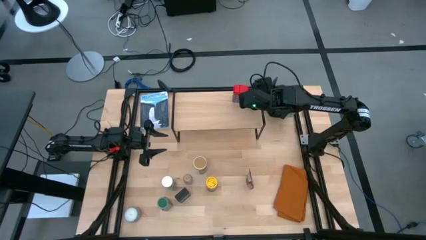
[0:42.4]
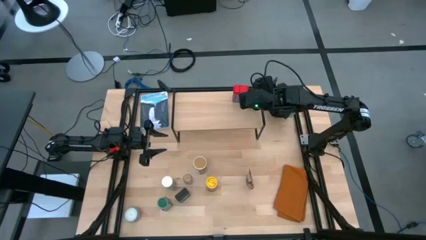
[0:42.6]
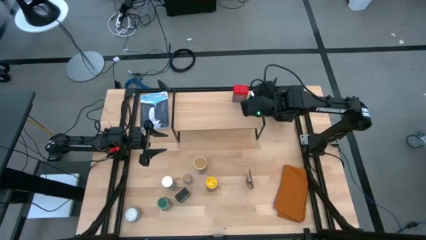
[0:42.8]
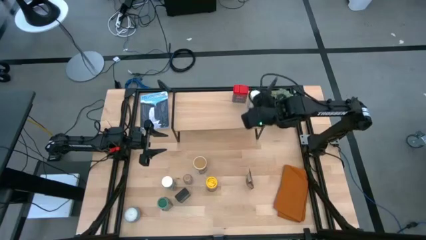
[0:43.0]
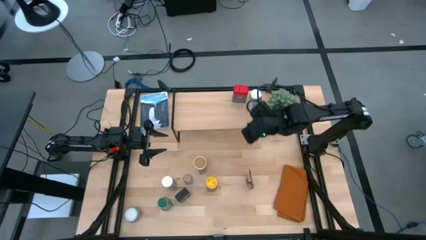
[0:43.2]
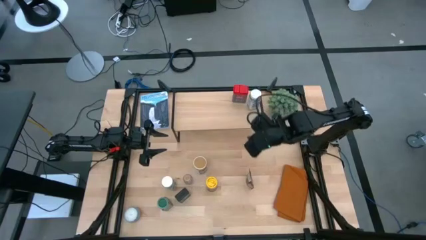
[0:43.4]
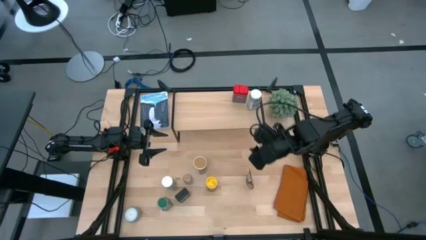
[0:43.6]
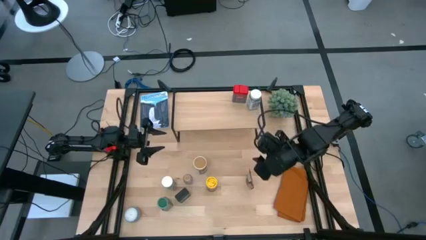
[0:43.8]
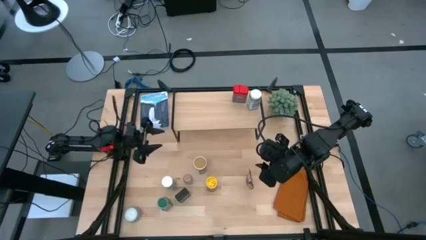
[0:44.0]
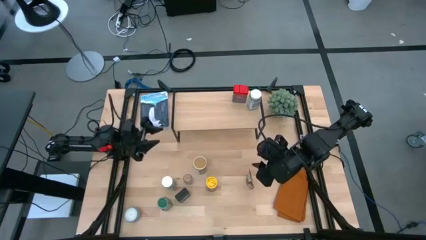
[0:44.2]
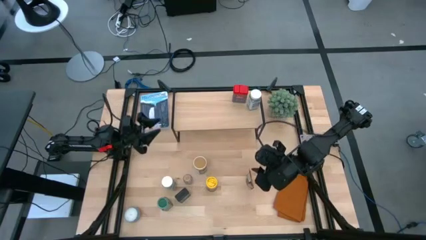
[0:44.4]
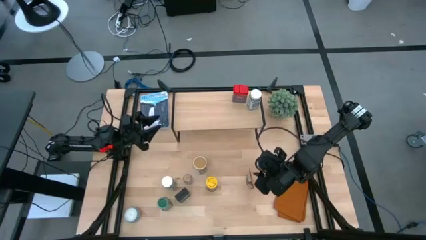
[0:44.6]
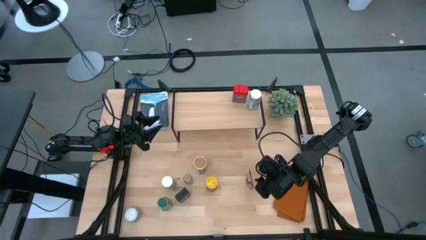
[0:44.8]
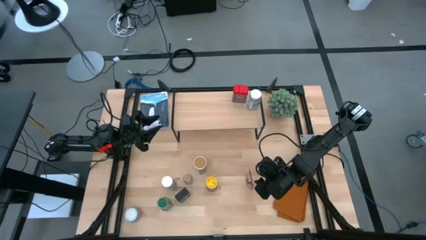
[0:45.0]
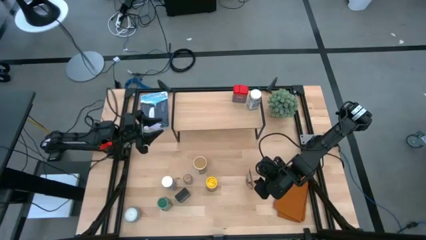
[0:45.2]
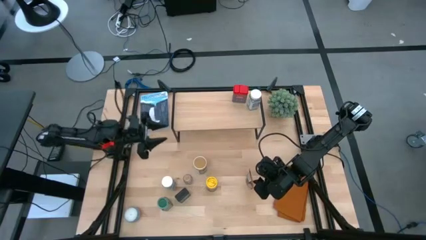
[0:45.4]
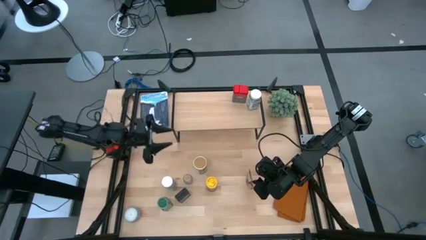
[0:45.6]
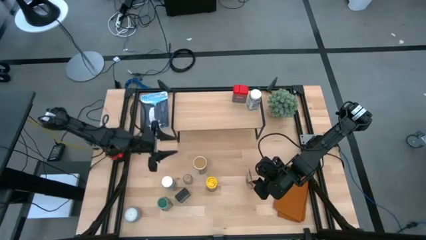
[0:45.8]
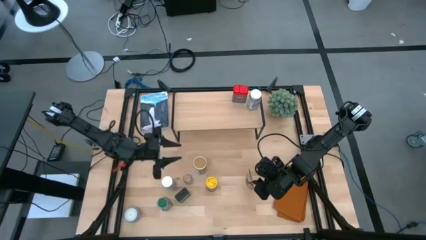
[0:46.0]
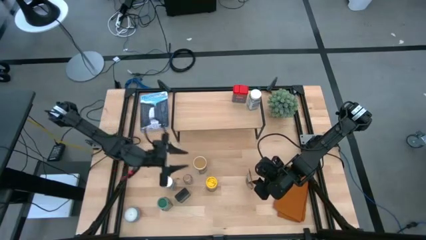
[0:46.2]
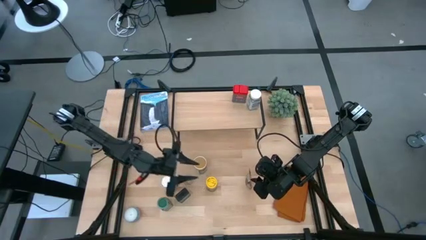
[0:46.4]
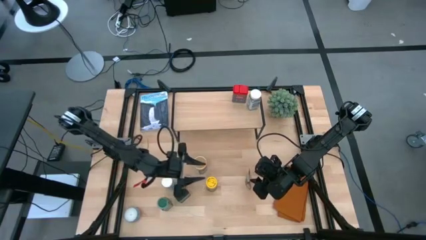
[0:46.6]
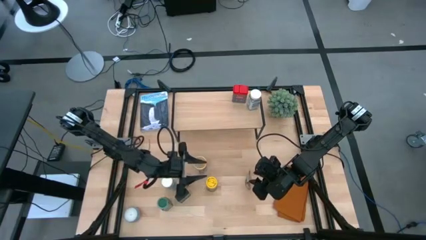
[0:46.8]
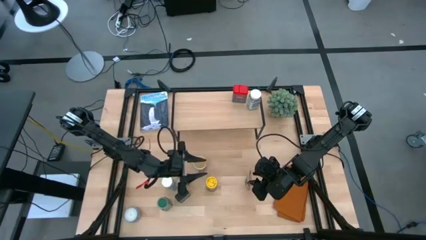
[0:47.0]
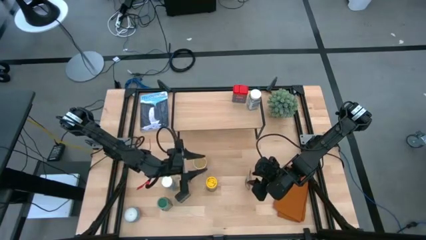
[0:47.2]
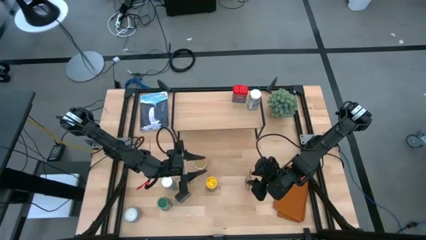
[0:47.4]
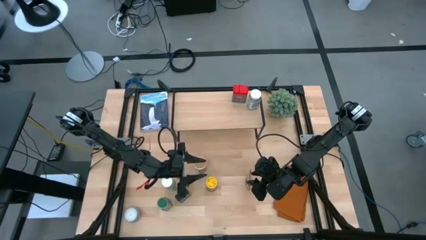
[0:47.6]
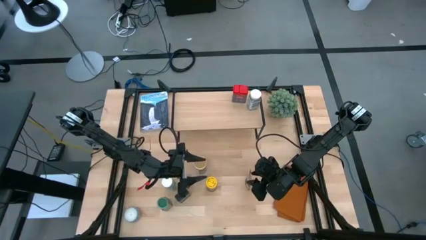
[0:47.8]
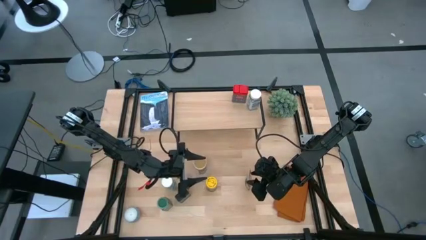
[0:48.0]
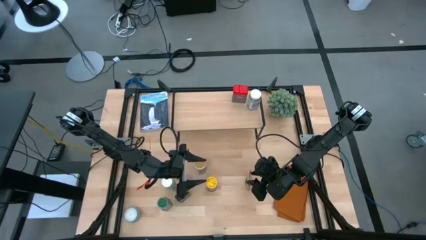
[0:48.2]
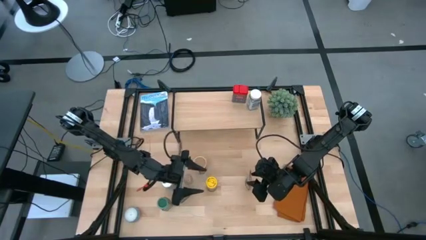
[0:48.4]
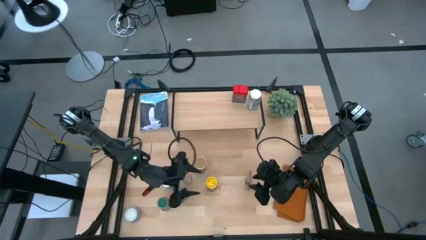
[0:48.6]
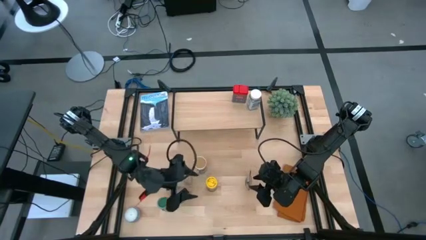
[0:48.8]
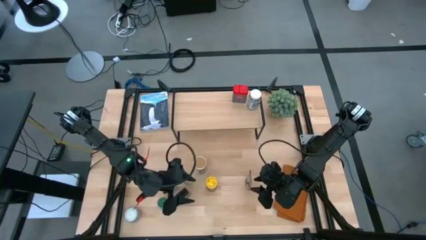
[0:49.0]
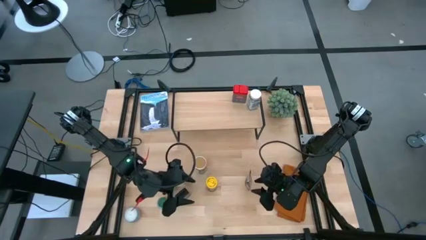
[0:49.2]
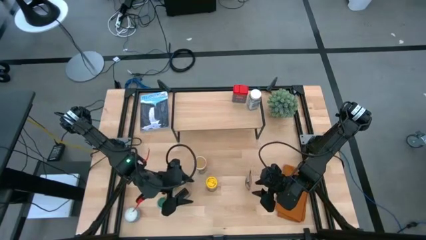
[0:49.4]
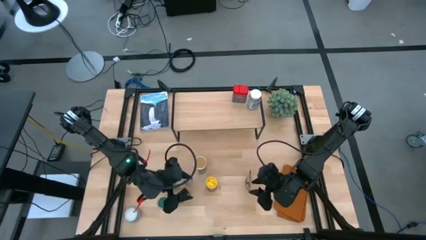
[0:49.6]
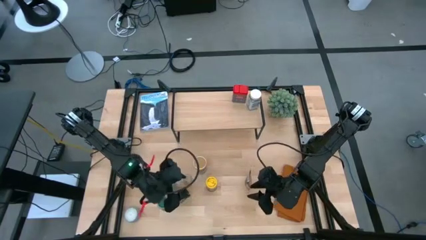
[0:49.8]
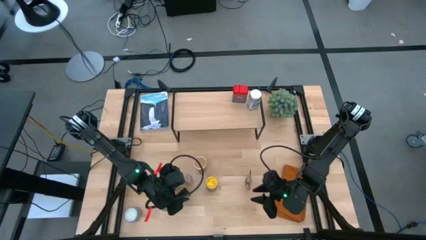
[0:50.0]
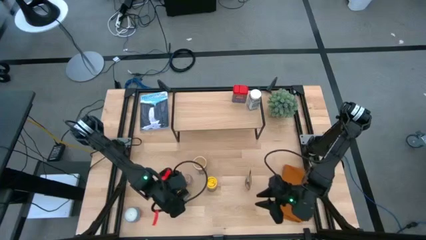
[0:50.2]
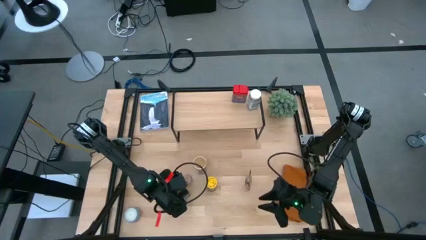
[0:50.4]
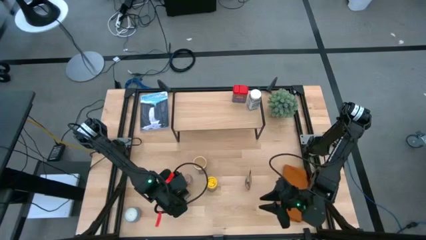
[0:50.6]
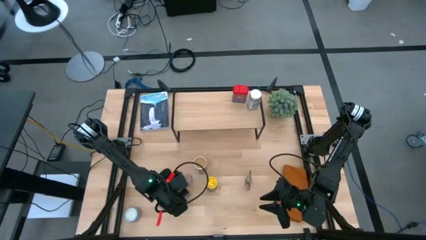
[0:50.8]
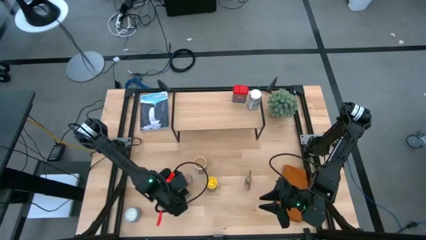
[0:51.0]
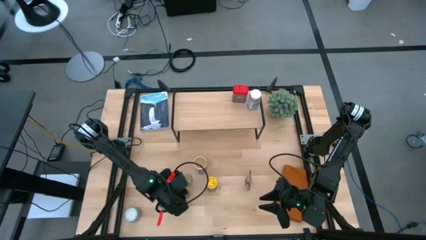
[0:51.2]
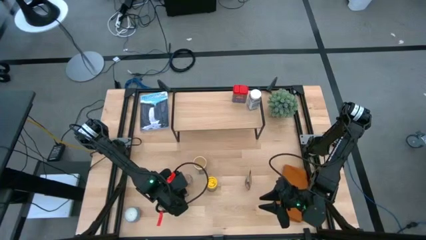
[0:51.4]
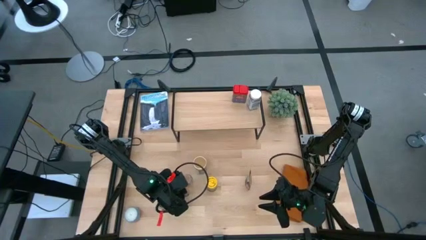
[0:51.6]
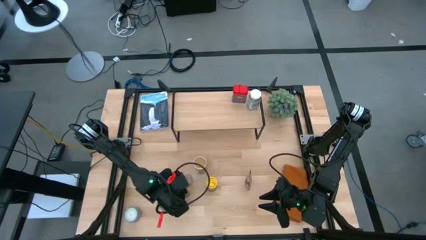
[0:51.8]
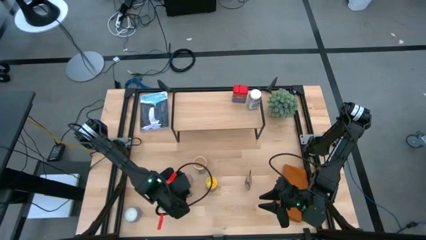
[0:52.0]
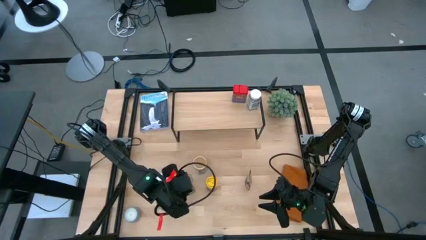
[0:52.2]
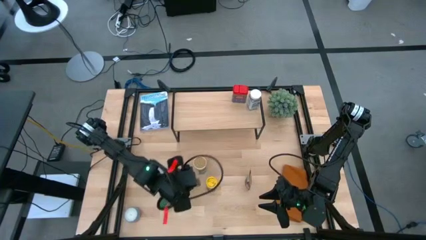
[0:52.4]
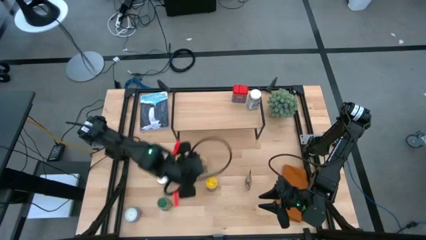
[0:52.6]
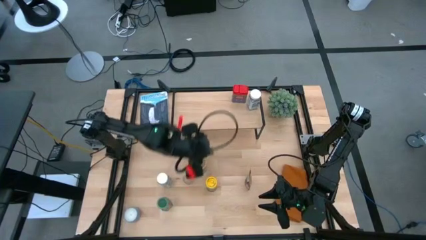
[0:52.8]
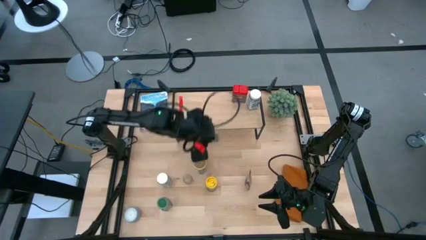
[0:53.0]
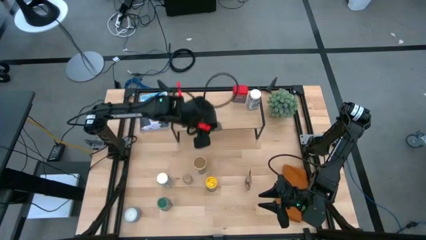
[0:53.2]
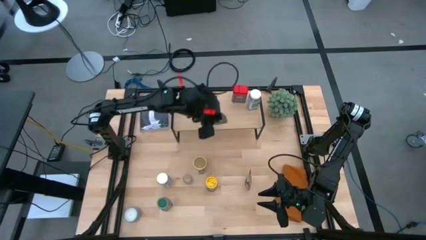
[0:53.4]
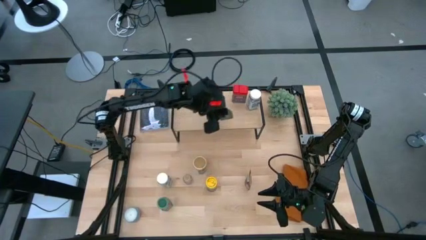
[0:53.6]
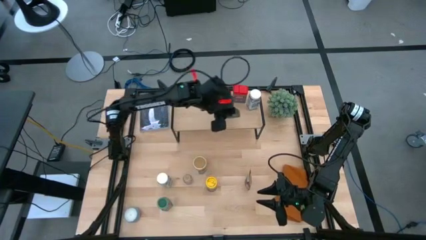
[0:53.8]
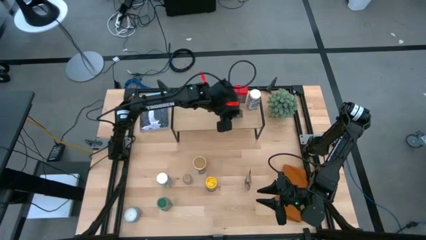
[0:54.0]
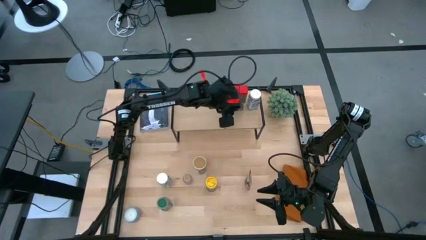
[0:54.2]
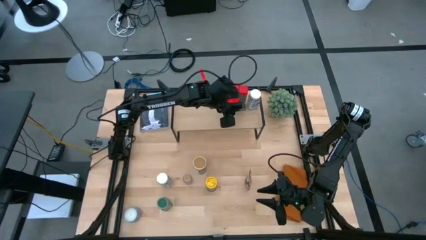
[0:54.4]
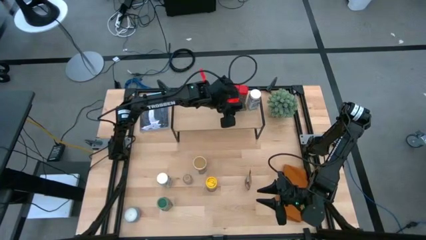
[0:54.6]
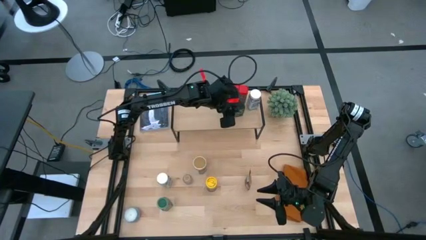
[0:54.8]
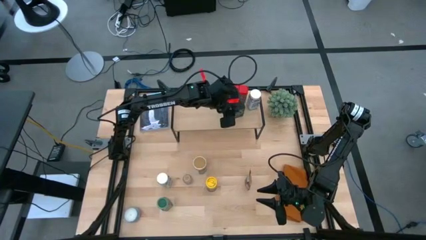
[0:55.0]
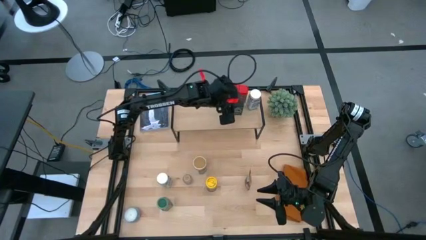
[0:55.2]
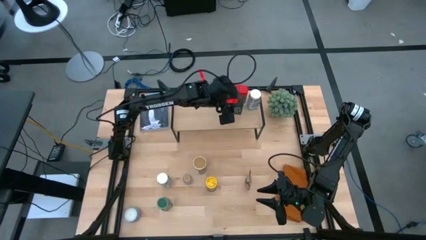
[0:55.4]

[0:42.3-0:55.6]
Task: Shelf spices
Put the black seasoning can on the shelf
